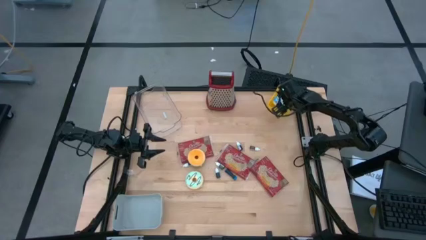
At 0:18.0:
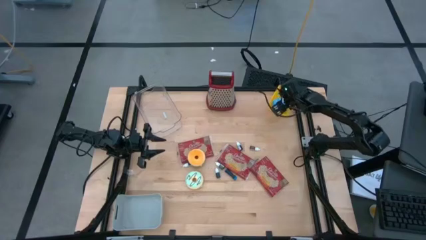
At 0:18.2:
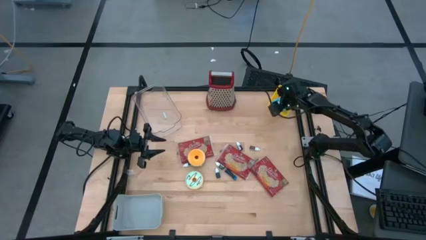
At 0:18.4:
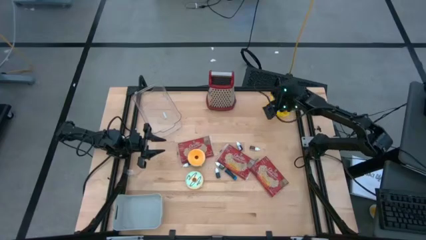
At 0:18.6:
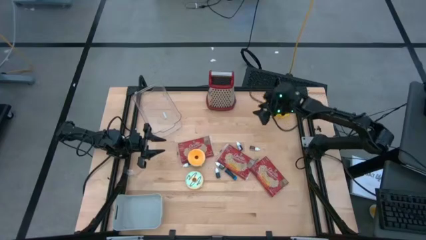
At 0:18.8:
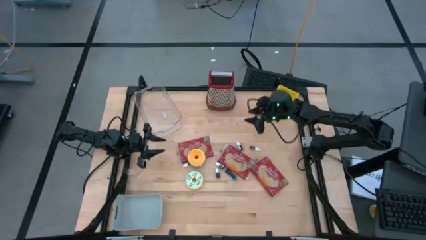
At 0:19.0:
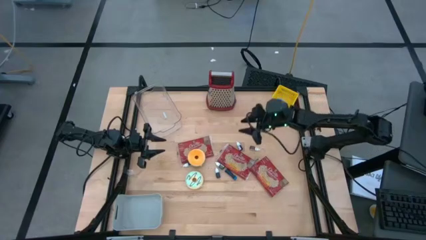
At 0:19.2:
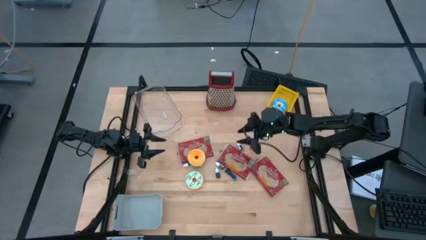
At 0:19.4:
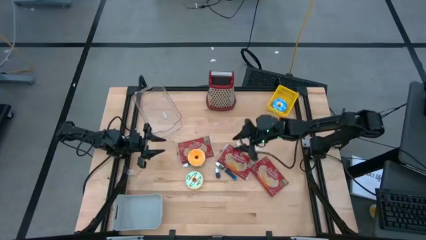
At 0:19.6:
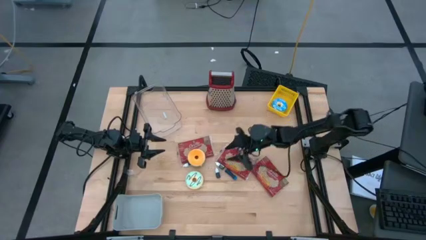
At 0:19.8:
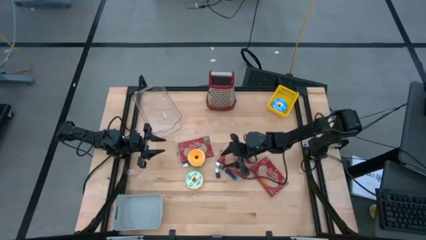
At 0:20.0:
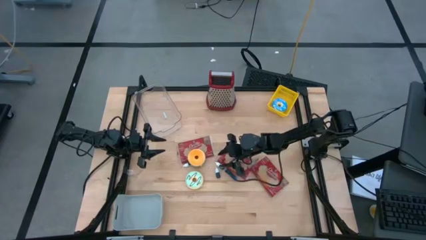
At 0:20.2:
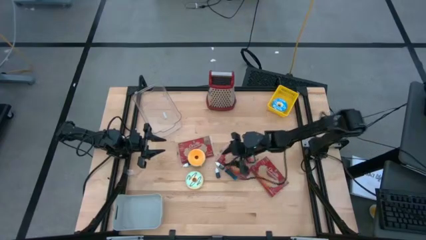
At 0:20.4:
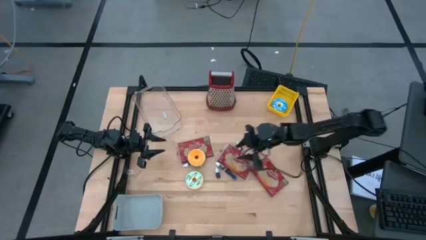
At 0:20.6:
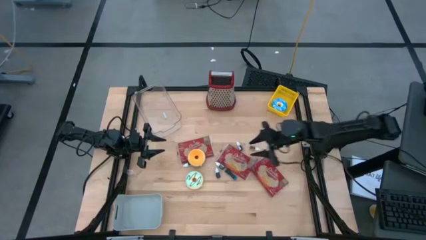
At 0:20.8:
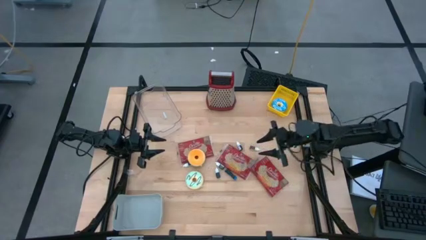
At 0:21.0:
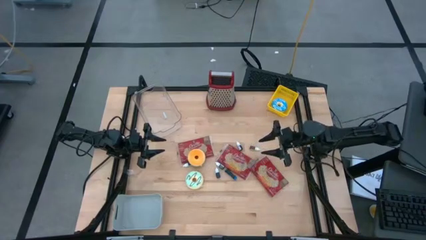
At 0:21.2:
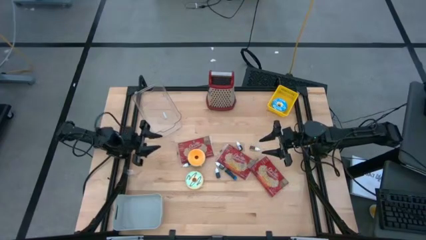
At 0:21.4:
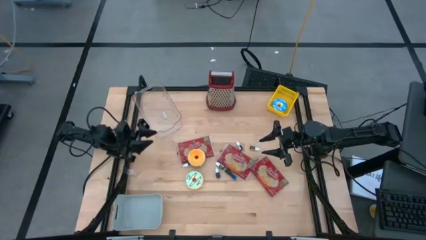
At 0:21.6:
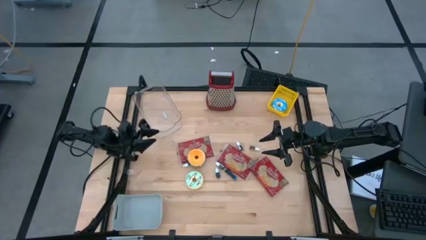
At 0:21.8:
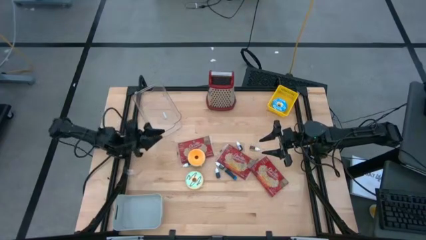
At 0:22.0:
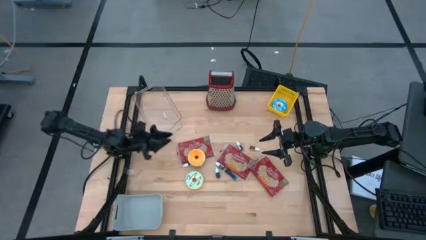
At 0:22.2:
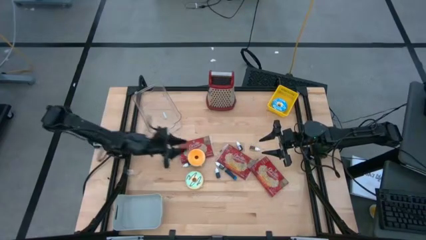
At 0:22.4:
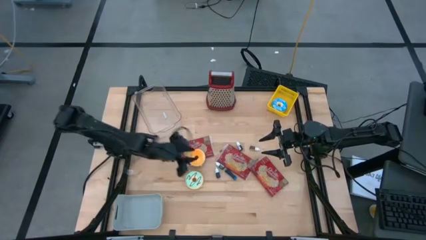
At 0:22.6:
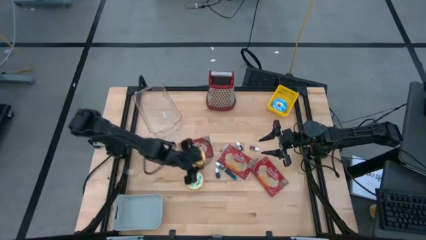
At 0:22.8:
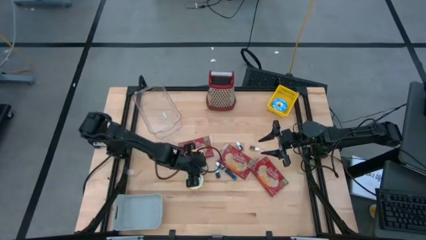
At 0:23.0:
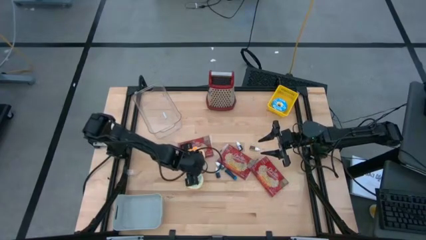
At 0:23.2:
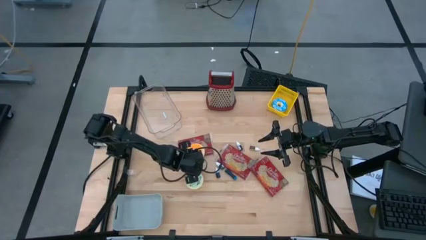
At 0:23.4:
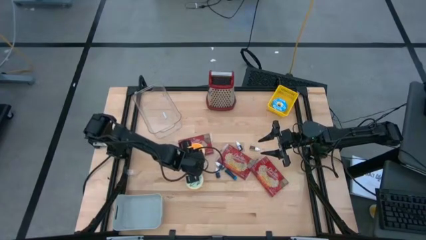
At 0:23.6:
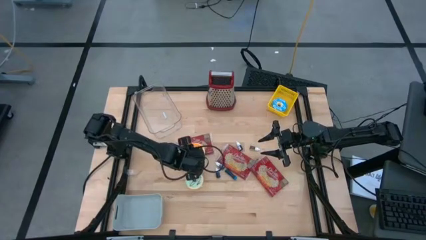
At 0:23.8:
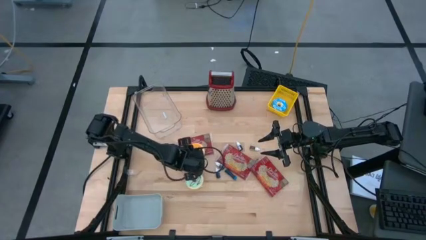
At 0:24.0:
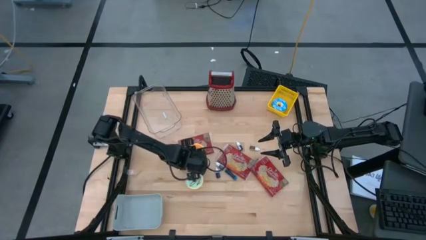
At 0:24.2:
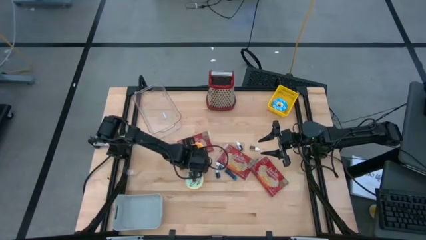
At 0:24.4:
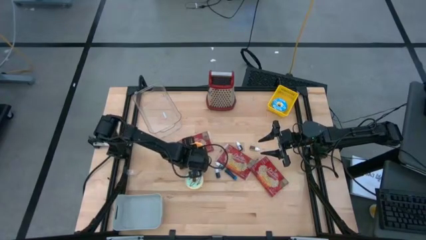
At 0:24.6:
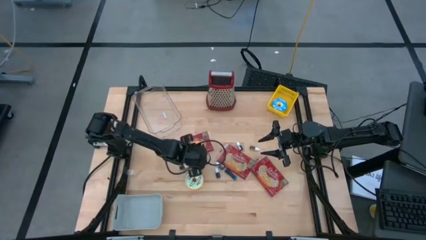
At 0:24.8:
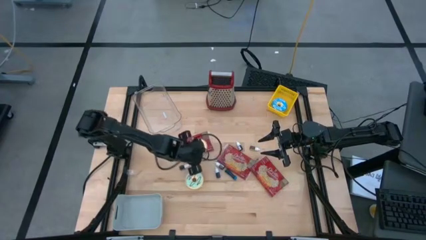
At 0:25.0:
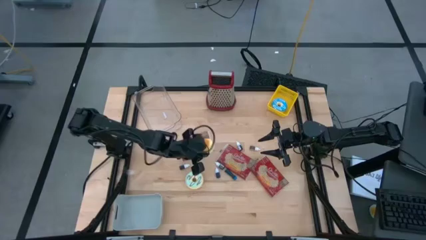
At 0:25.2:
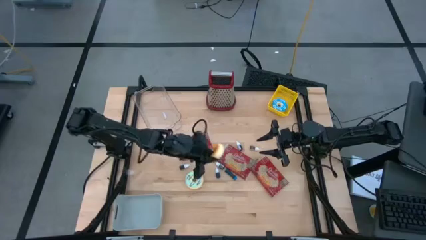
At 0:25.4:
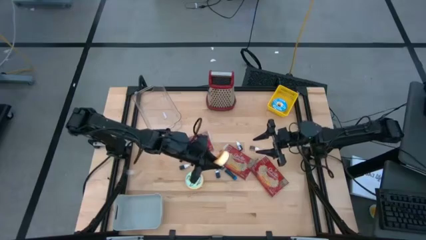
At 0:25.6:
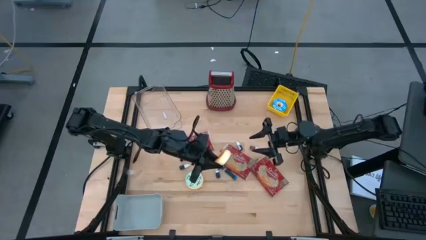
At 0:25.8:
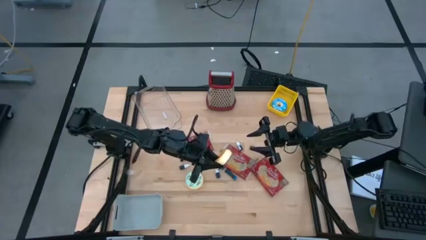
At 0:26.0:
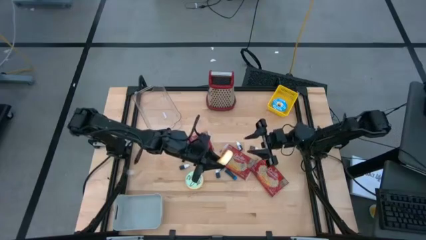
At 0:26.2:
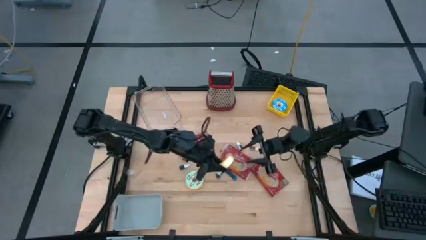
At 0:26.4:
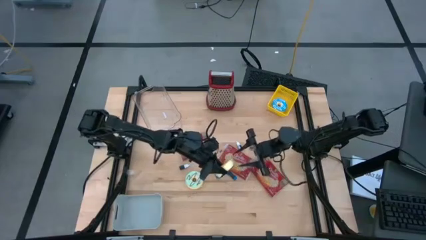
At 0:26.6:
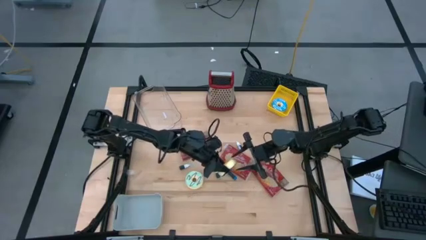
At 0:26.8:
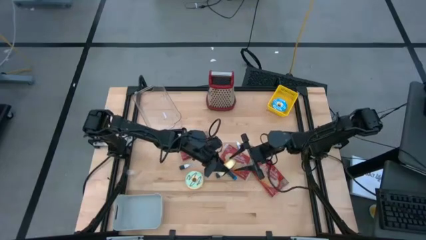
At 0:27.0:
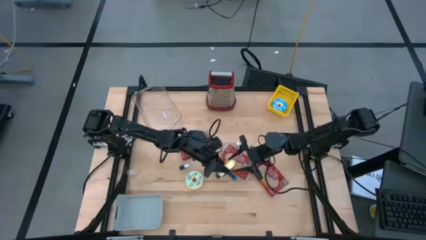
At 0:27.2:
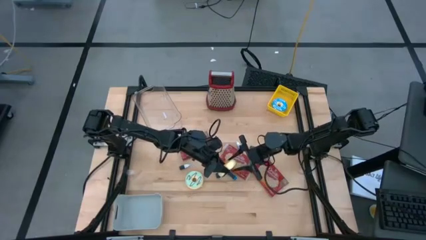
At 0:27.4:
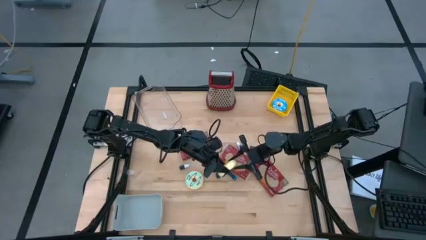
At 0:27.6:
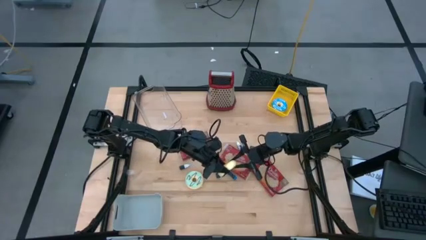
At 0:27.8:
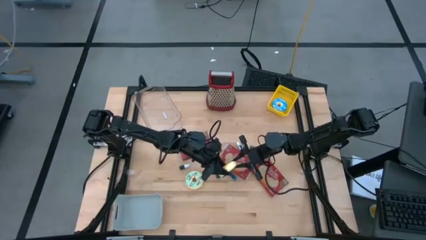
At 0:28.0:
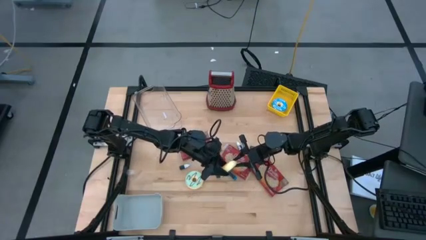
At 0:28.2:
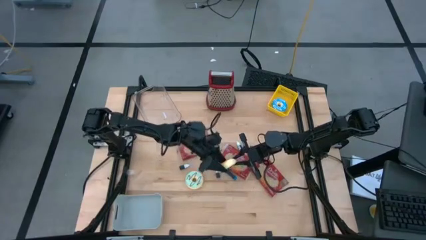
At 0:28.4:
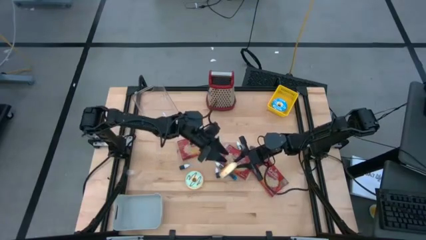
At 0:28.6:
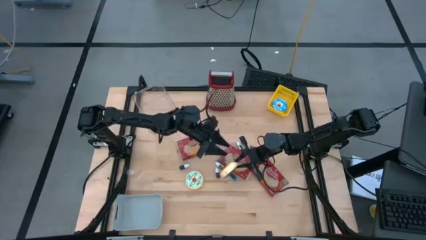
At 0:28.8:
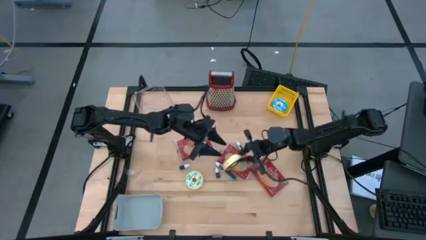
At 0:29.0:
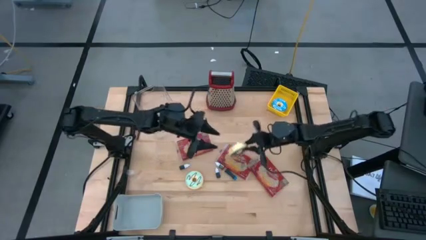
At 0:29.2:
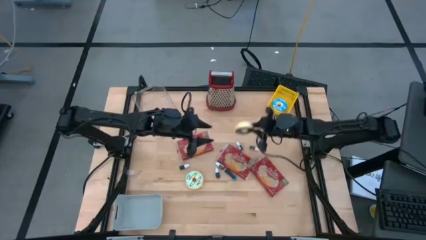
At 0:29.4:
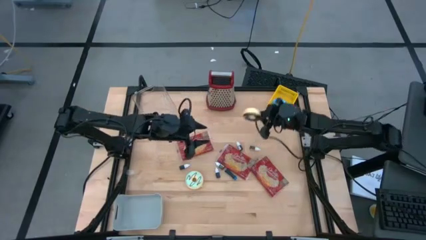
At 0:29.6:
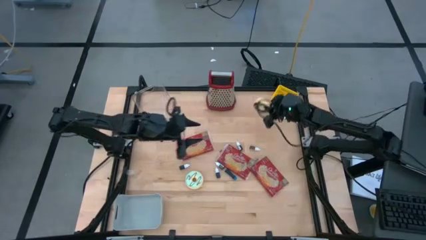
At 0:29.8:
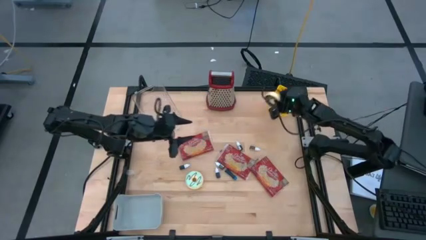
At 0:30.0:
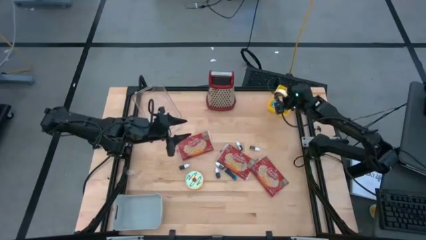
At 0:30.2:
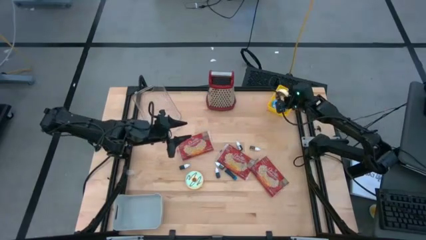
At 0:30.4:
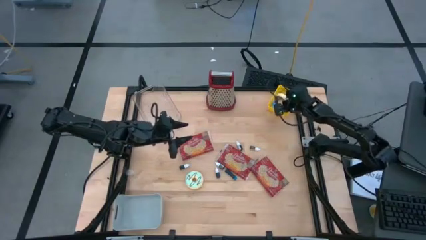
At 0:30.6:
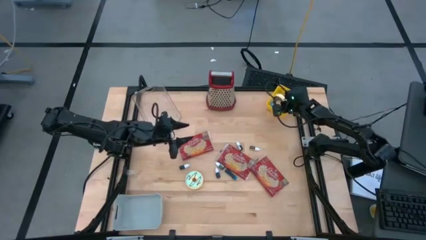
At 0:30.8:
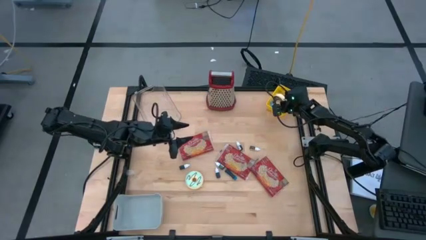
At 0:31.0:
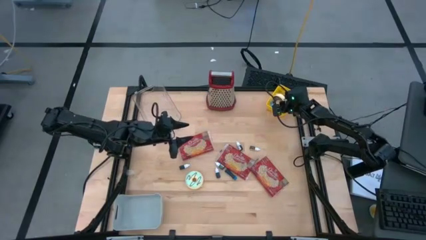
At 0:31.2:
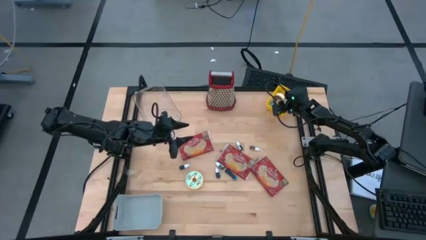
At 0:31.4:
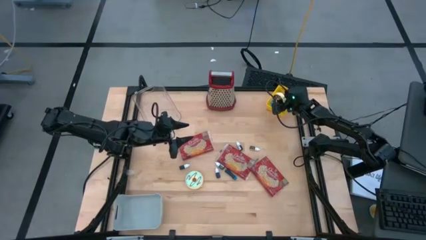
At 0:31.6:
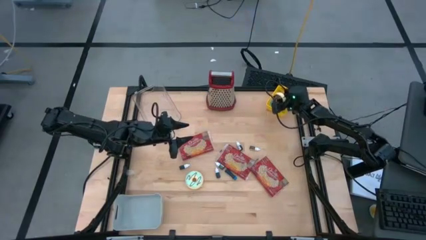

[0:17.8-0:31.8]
Put the black donut into the yellow bin
